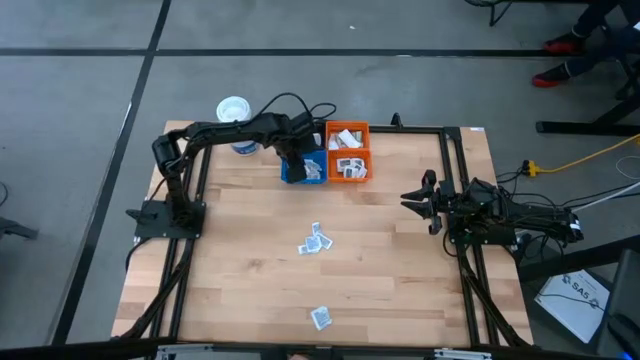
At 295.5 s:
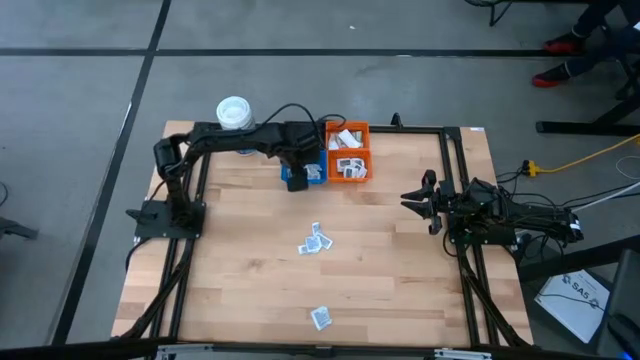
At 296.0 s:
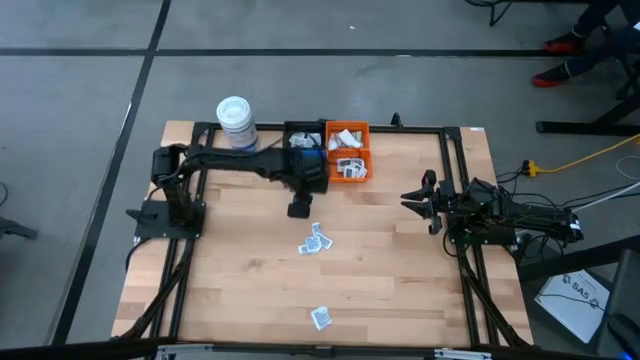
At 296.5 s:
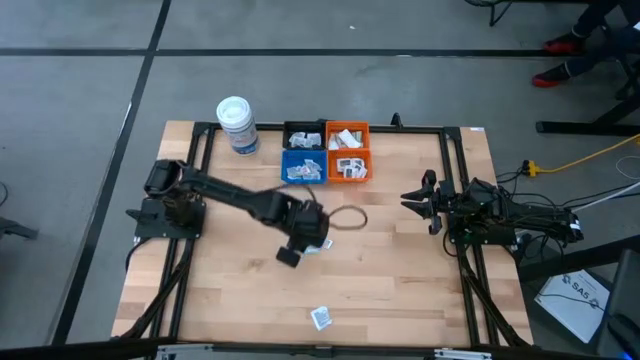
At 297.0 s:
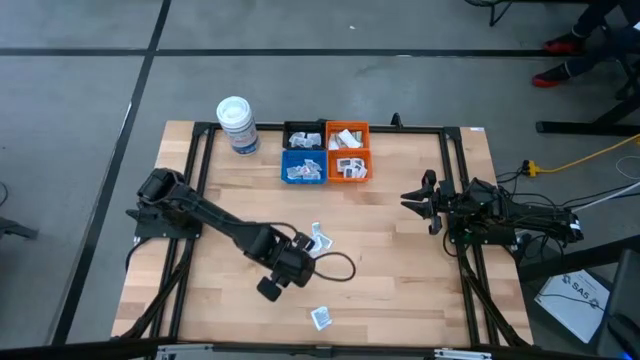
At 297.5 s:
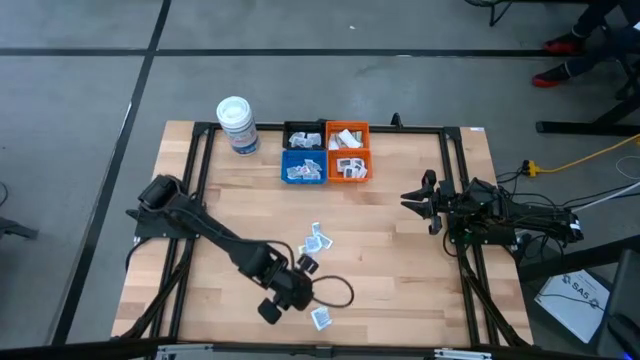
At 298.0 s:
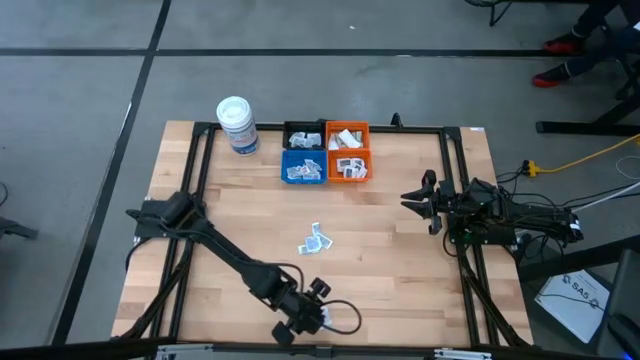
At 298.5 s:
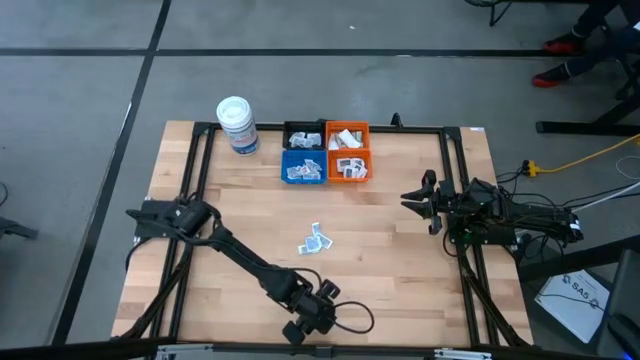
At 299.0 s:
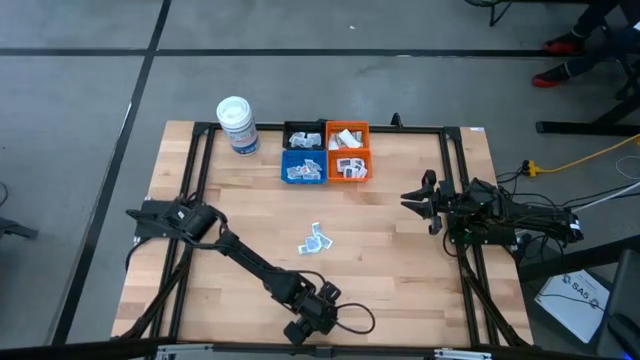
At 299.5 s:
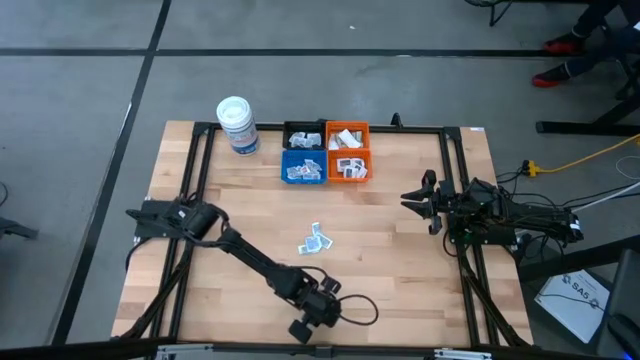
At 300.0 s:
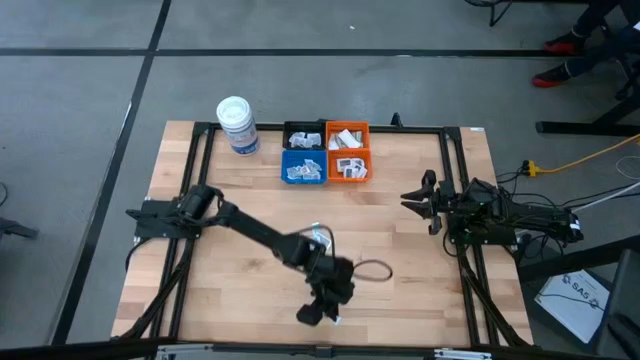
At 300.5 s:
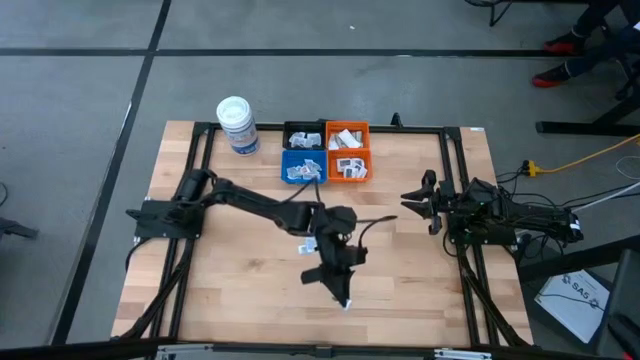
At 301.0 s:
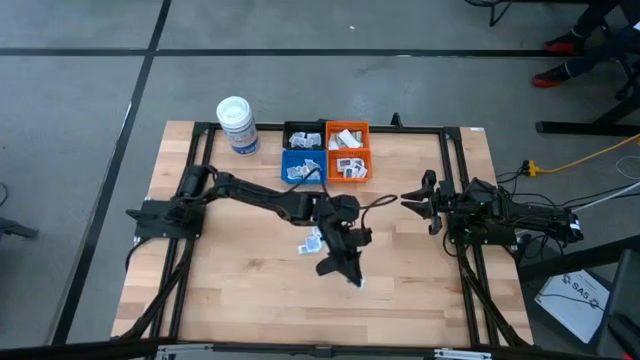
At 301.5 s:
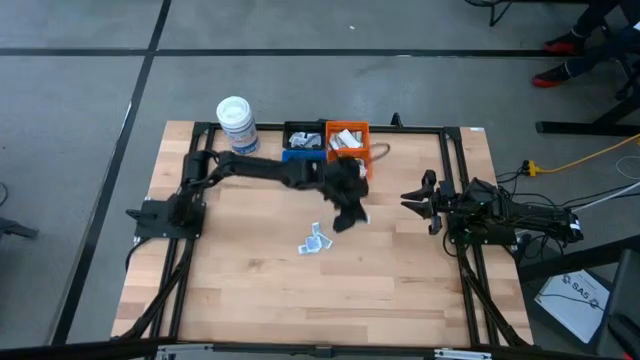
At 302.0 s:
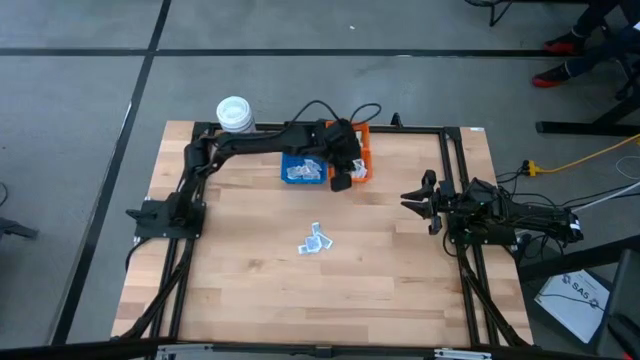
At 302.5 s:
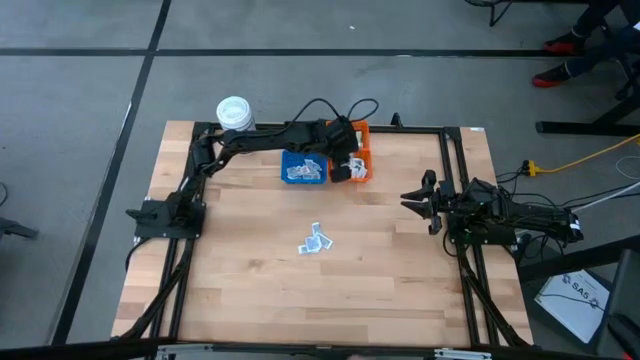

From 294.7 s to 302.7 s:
Task: Pick & Place First Aid Supplies
Put the towelette pack into the bottom orange bin

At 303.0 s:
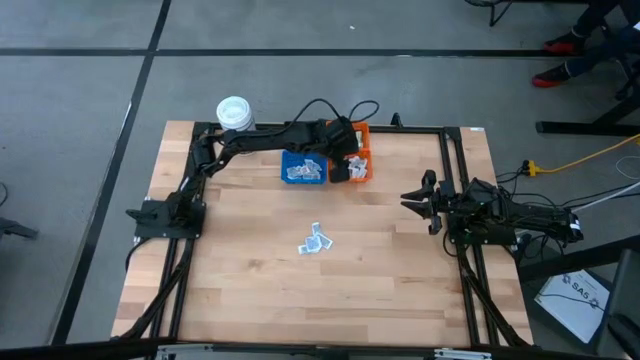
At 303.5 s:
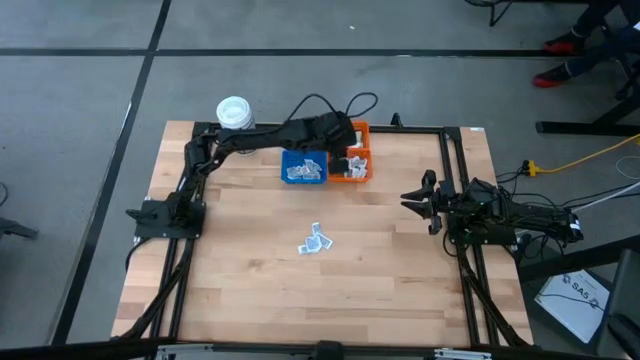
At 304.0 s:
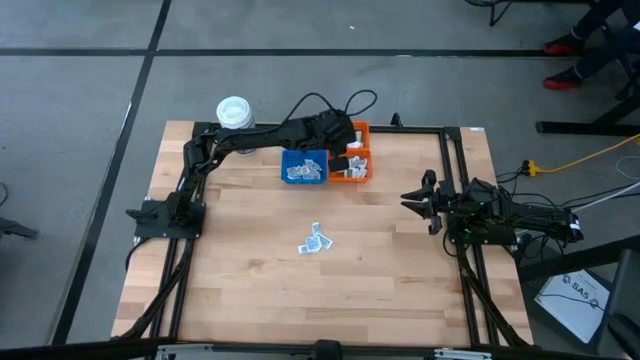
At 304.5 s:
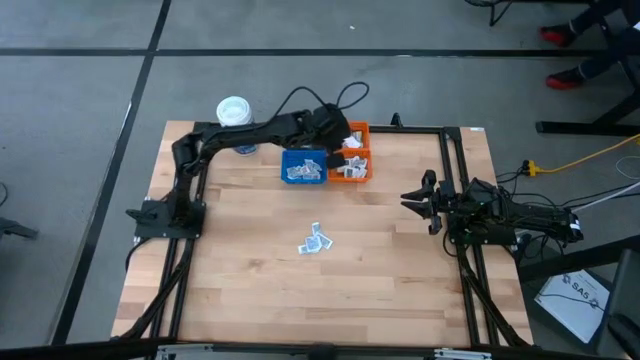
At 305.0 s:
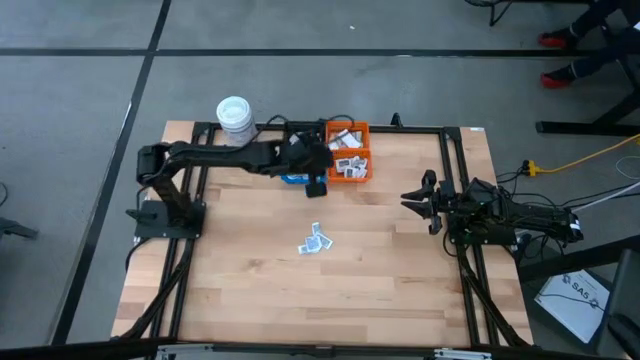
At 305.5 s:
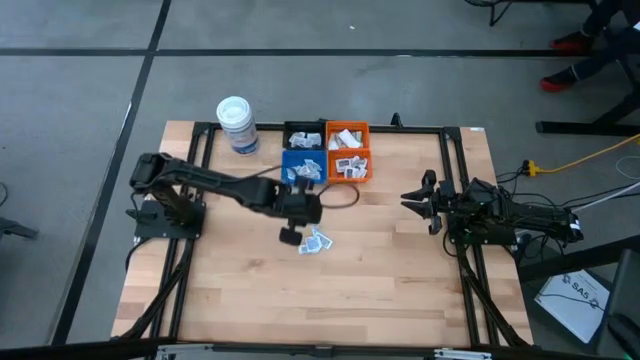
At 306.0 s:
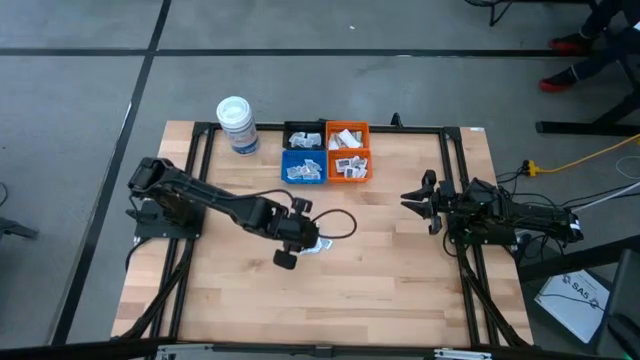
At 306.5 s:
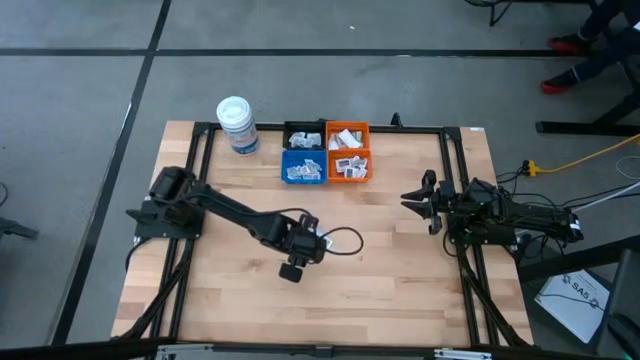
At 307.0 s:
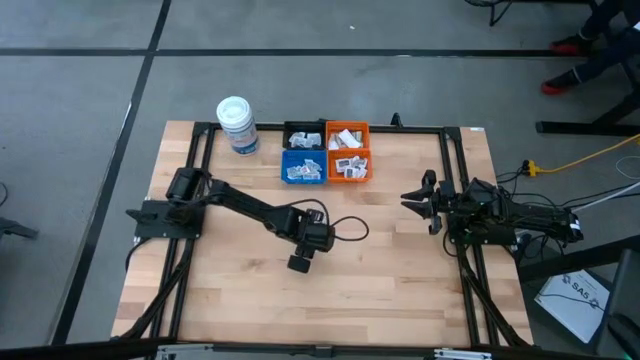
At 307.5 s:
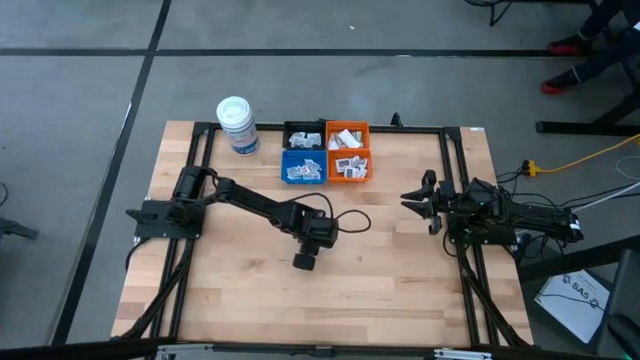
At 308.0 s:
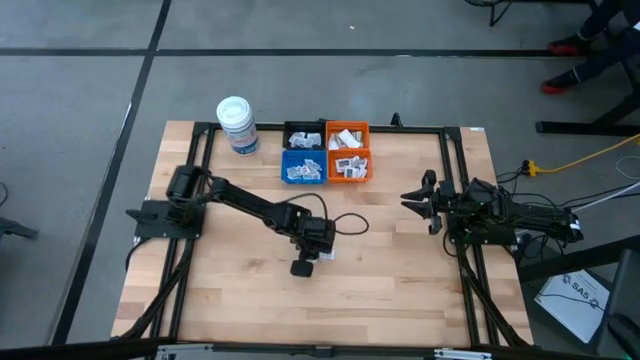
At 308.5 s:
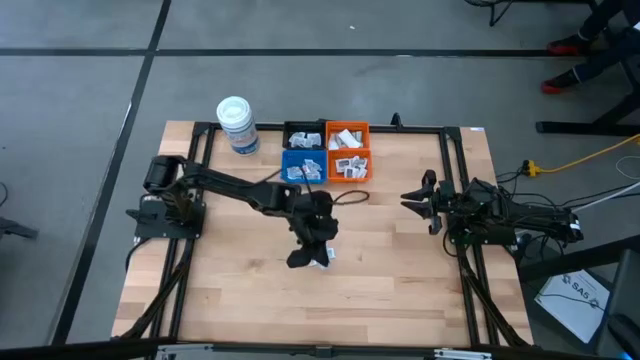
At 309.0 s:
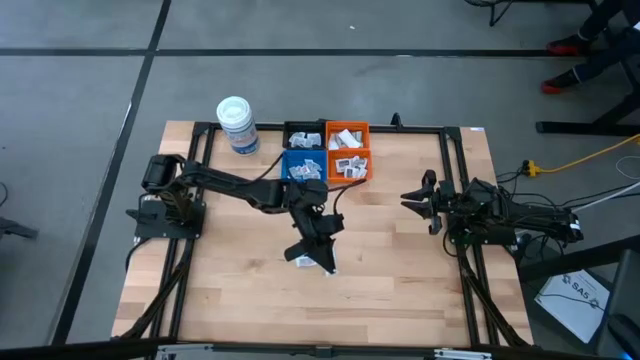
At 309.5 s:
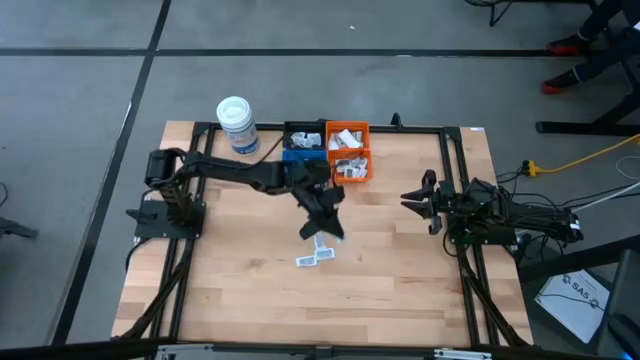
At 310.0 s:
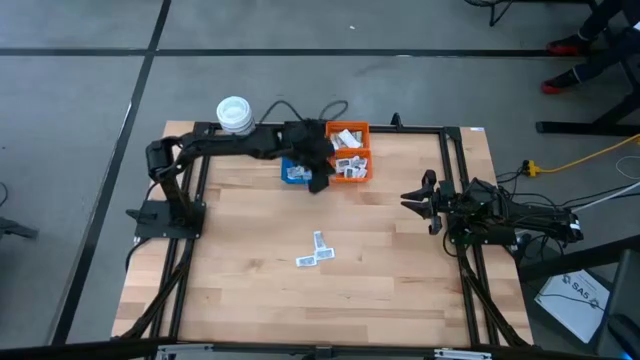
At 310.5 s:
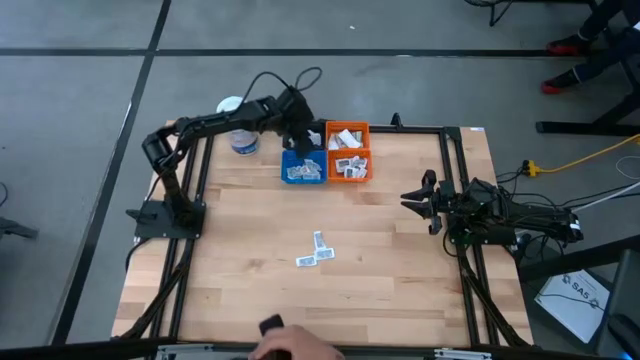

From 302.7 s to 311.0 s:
Put the alcohol pad into the black bin

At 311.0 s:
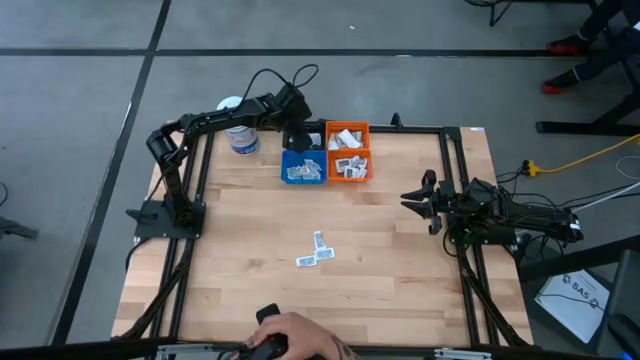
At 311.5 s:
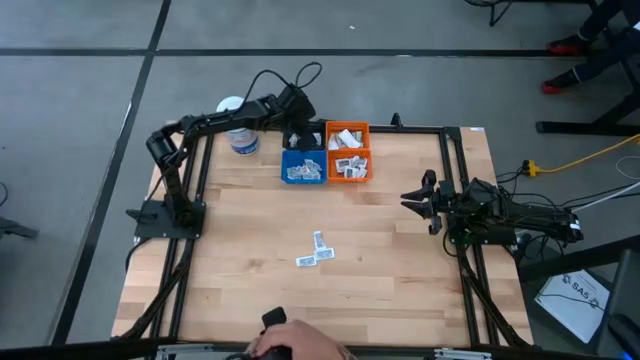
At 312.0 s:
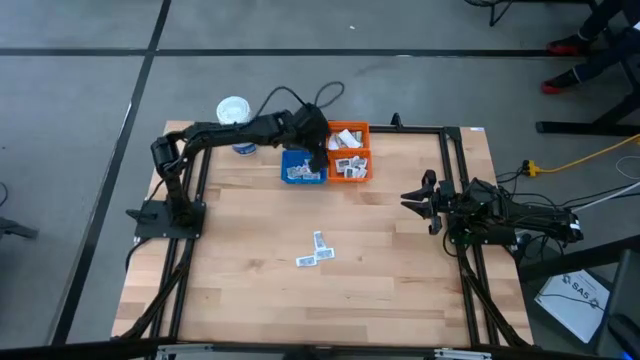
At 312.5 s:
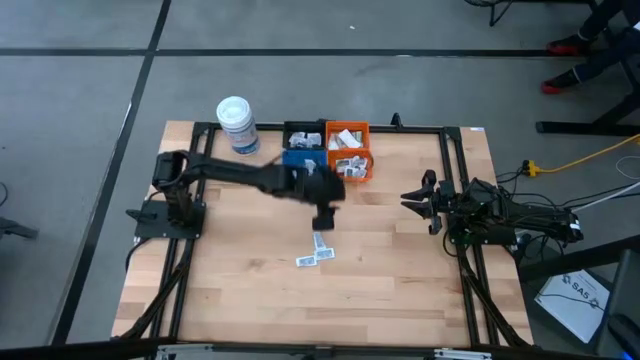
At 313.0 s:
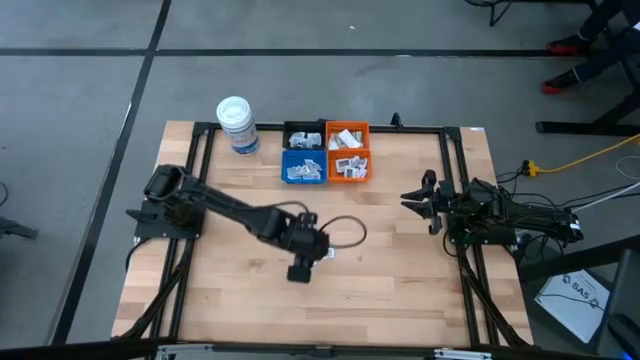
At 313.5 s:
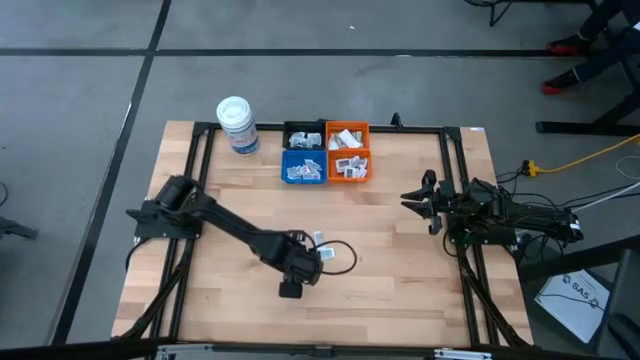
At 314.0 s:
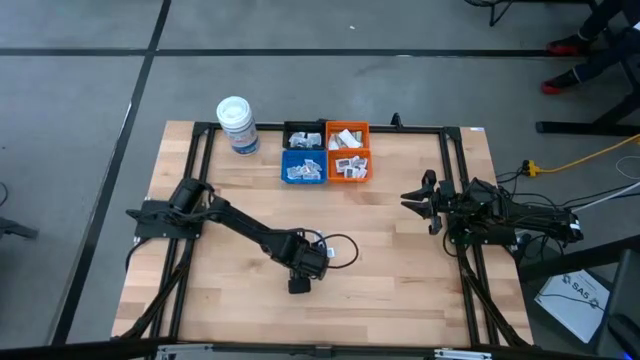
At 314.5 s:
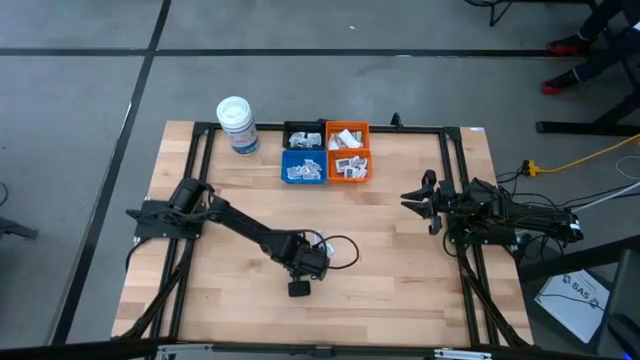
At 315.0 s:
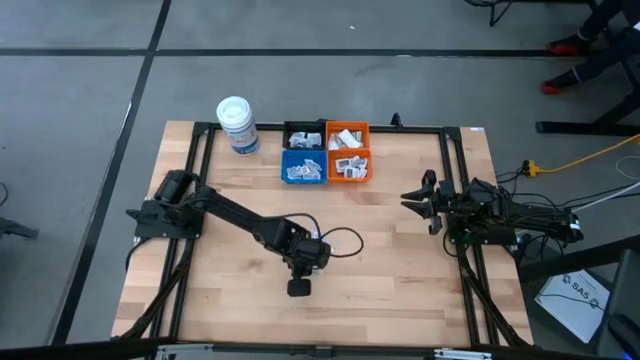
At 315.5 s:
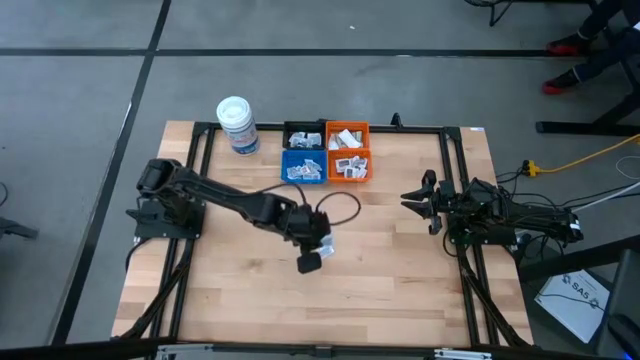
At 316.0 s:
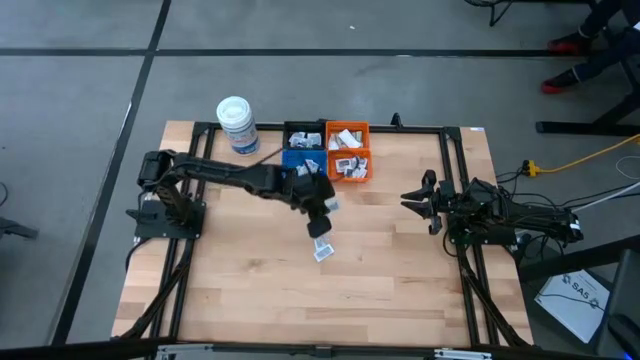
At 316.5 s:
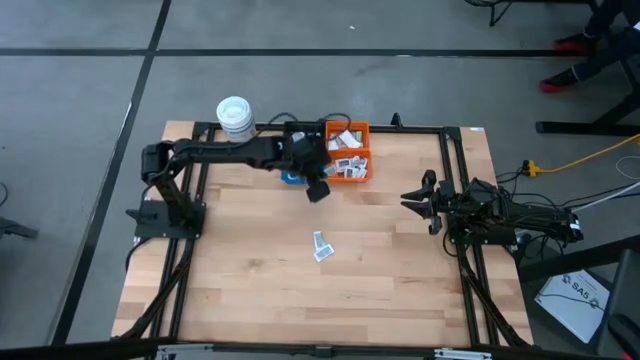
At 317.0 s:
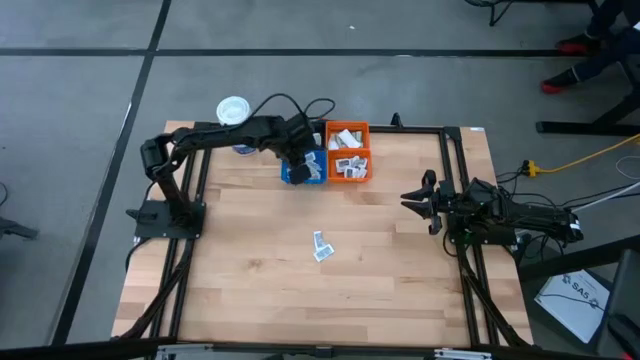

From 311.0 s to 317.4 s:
Put the ointment pack into the blue bin
